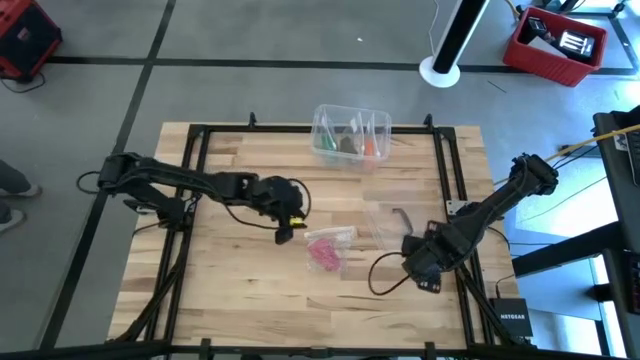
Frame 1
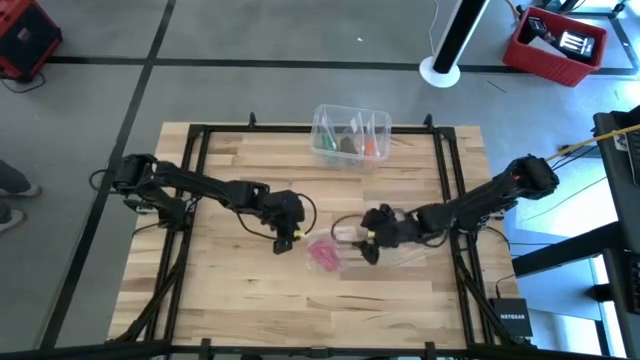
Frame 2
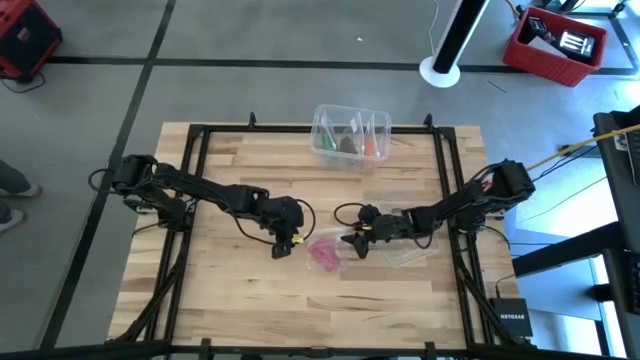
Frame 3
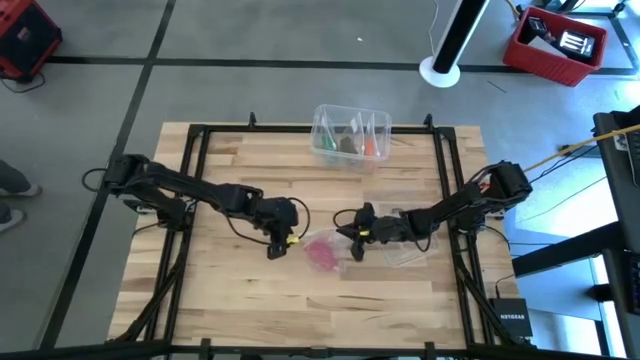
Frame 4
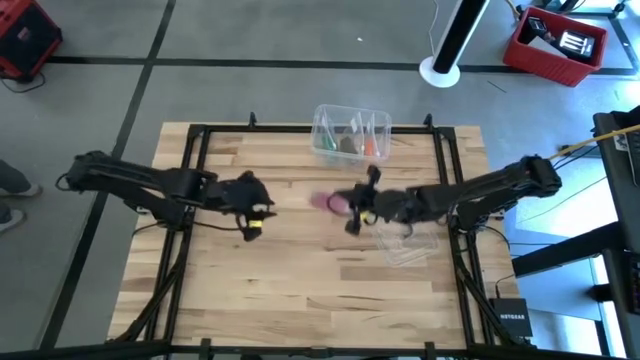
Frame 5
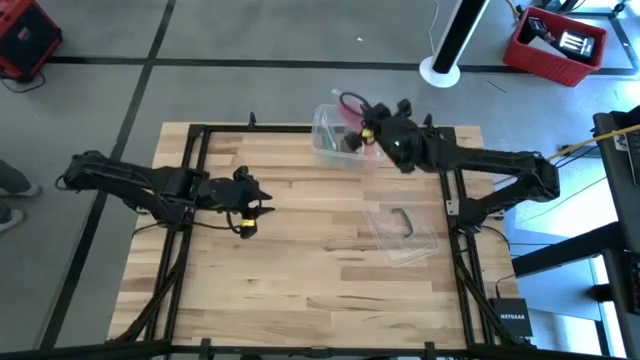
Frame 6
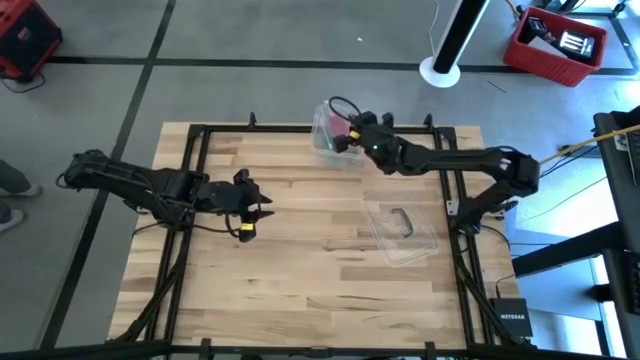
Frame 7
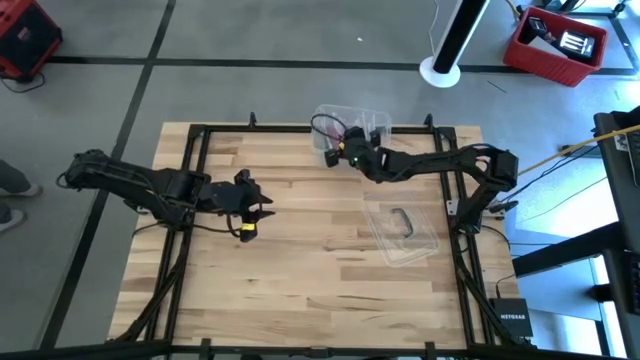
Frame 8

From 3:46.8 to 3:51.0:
Task: Roll bandage
Put the transparent zip bag into the transparent container

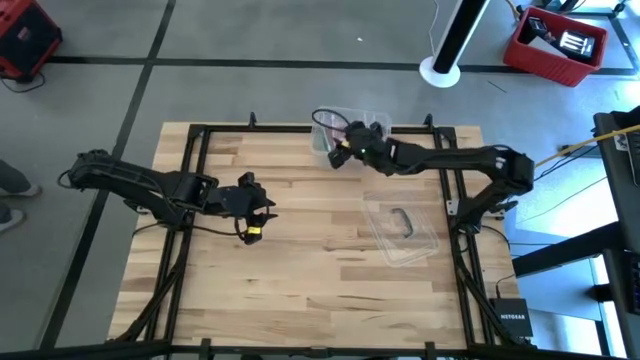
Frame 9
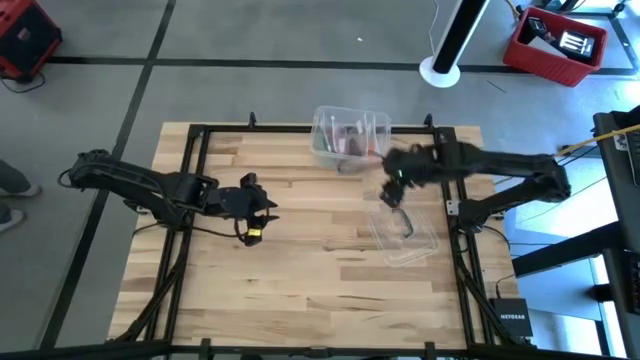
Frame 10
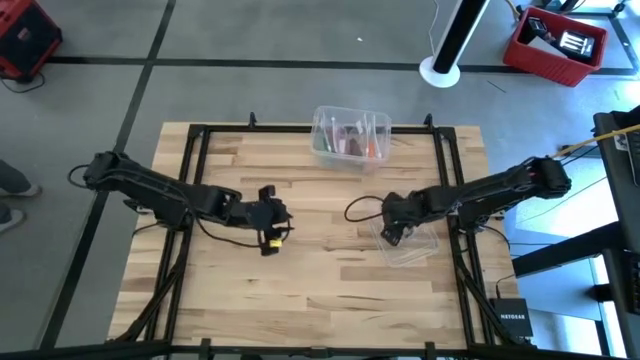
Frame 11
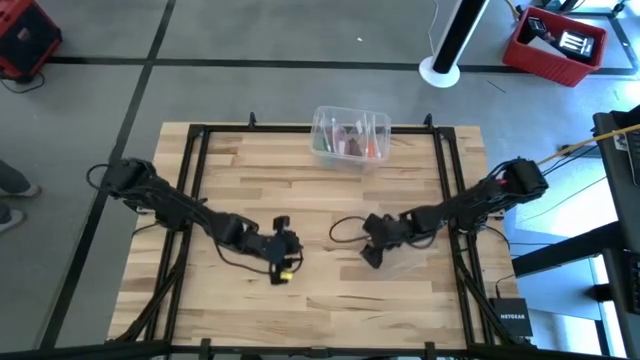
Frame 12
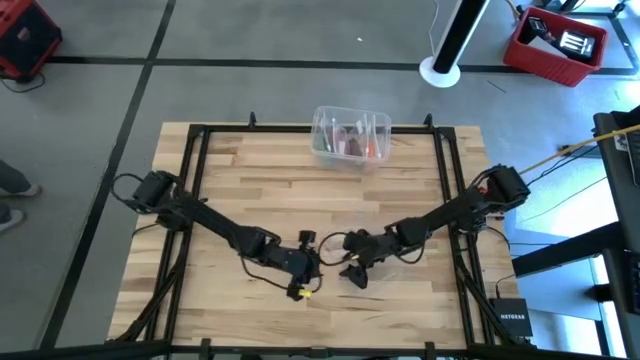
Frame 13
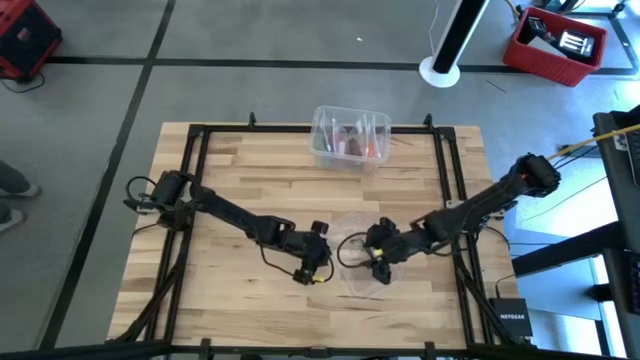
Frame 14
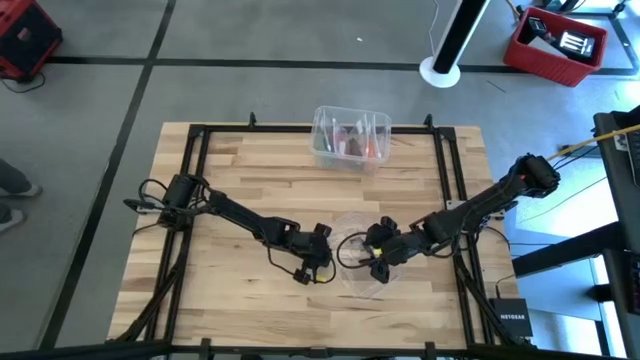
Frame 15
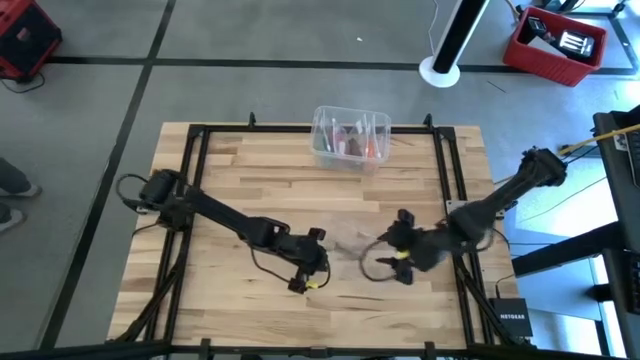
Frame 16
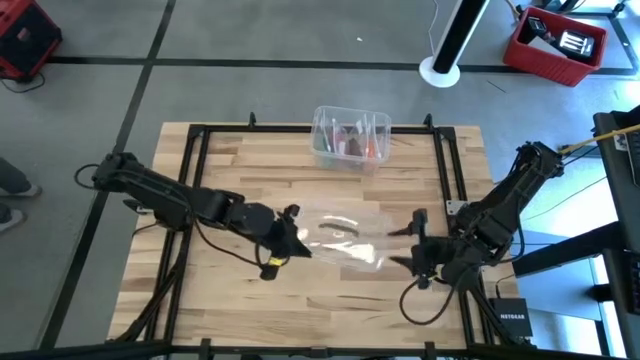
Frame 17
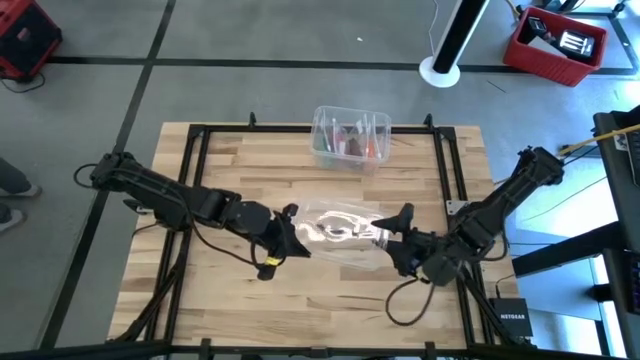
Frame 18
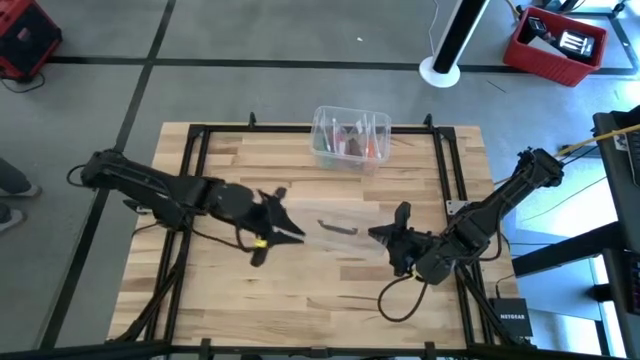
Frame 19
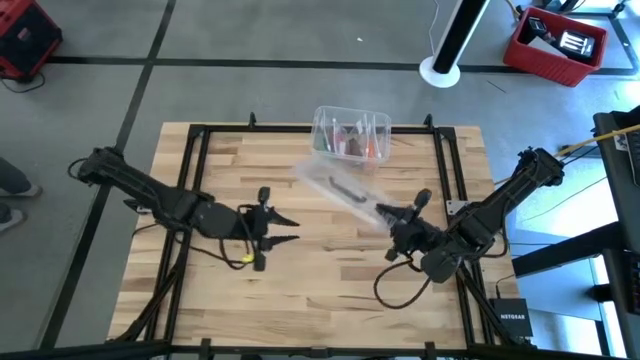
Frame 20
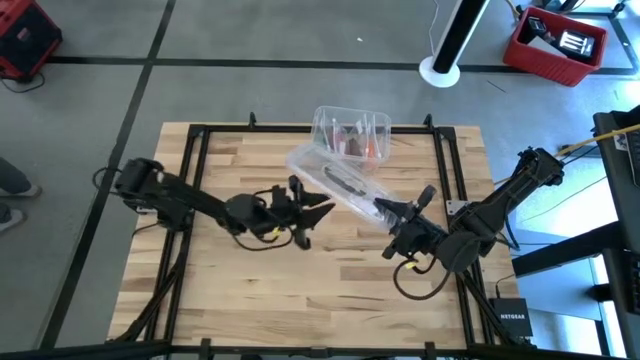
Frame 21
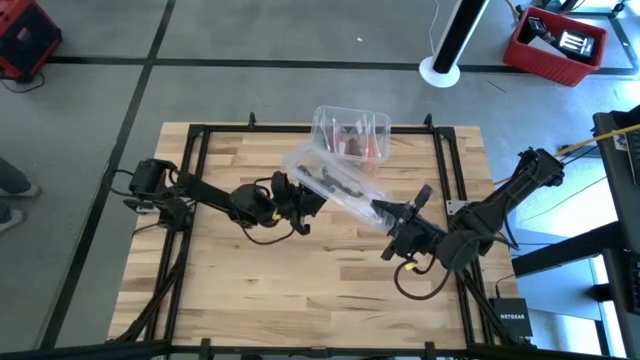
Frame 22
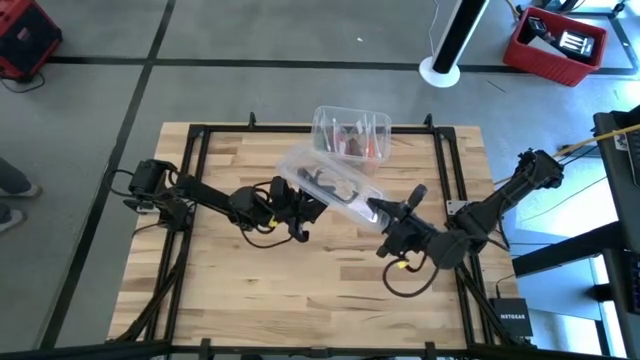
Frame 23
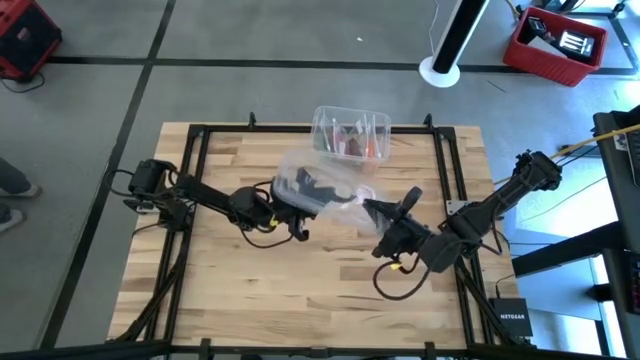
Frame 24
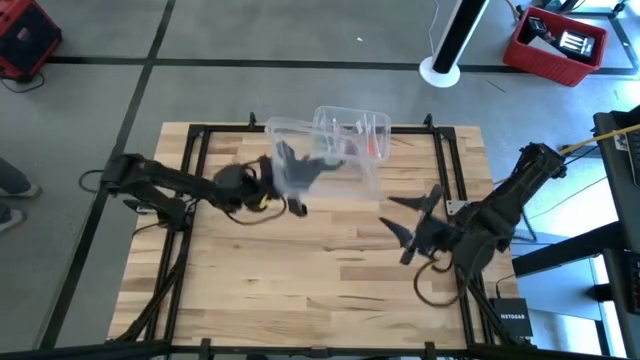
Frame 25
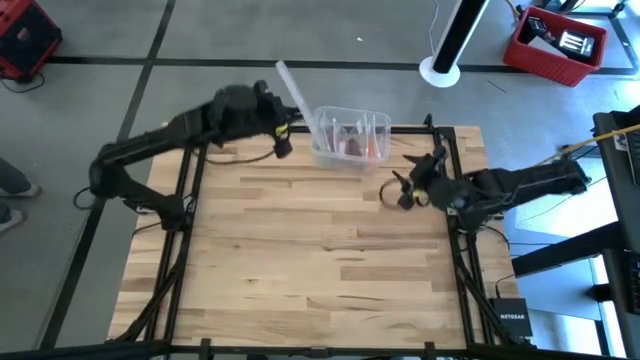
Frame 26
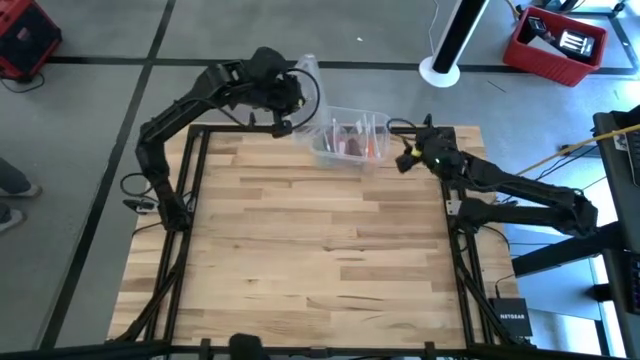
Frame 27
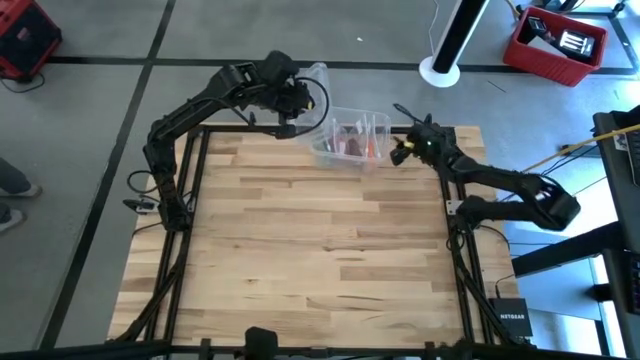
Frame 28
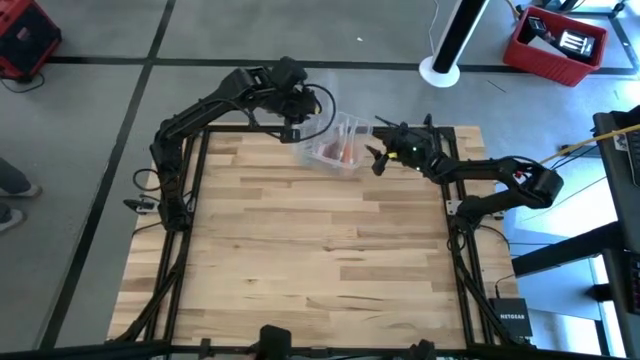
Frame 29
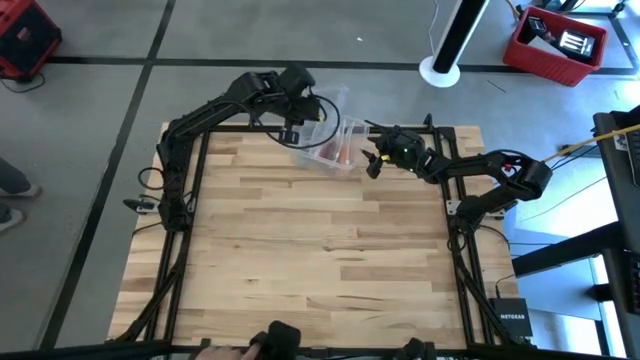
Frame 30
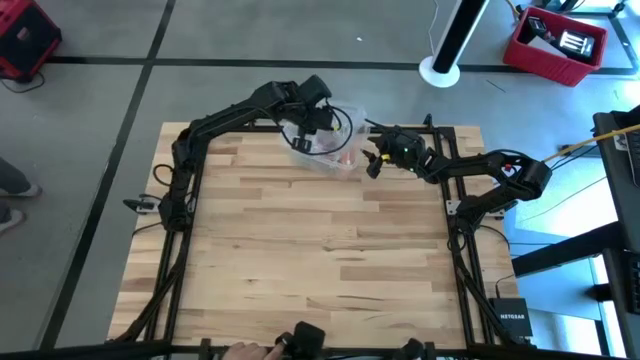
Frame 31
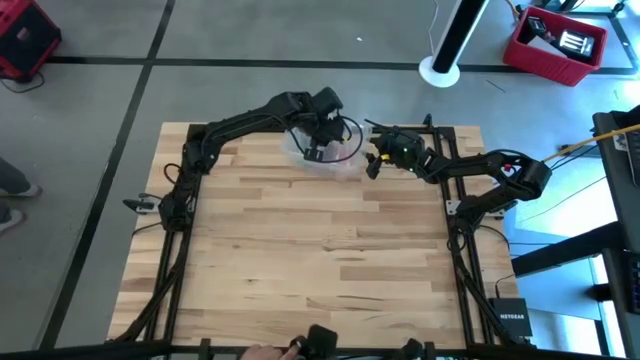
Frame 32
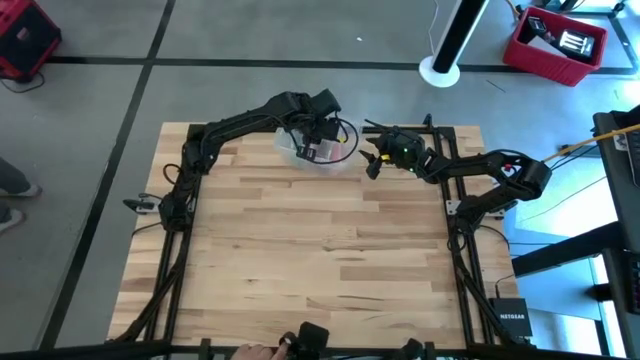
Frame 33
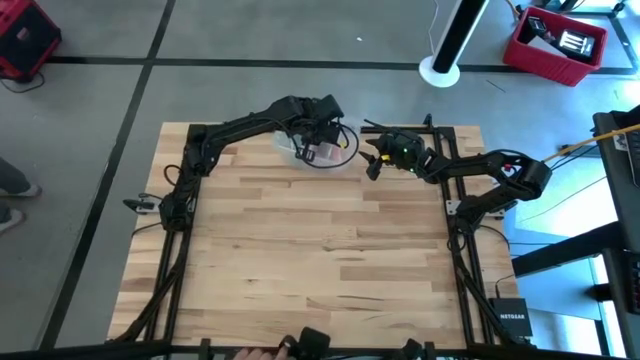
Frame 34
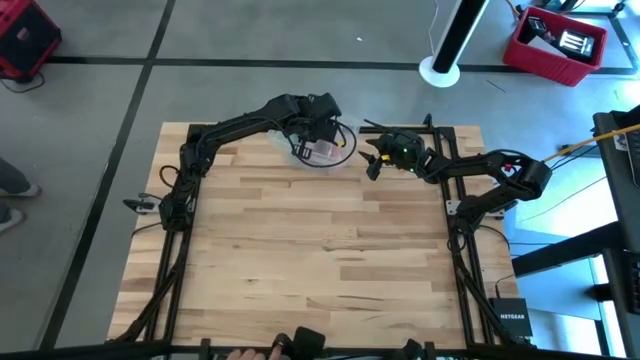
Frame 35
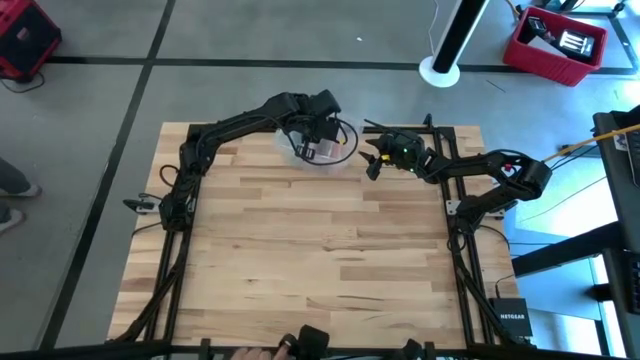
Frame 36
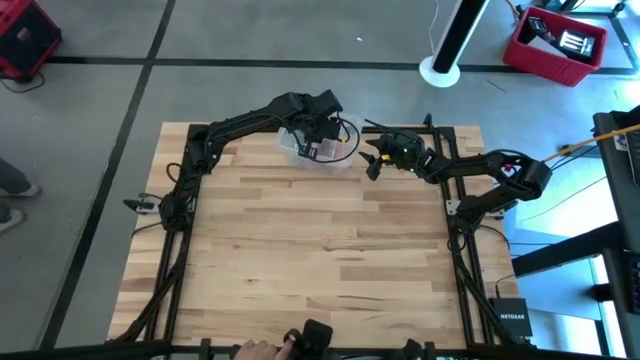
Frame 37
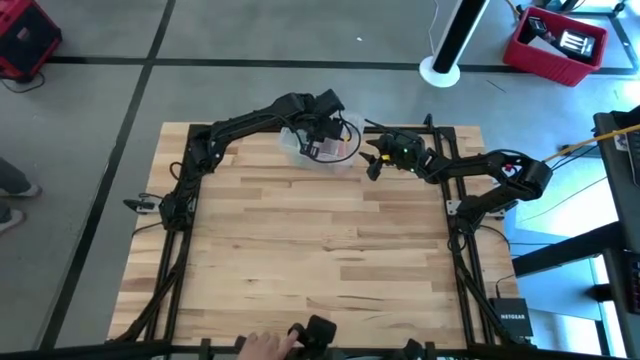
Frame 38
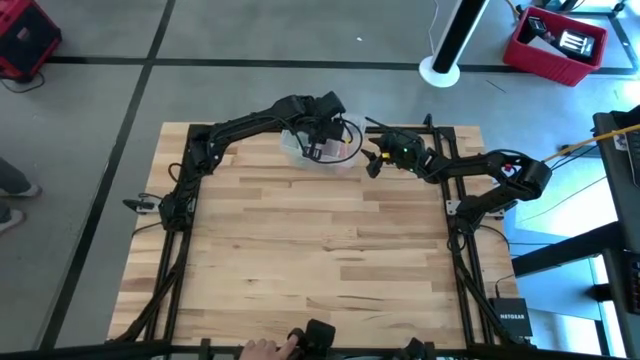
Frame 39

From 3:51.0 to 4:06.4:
Close the transparent container

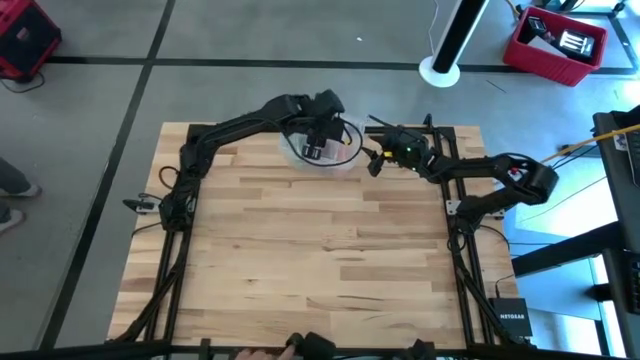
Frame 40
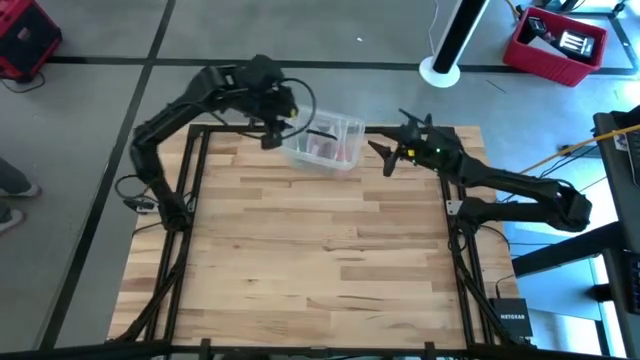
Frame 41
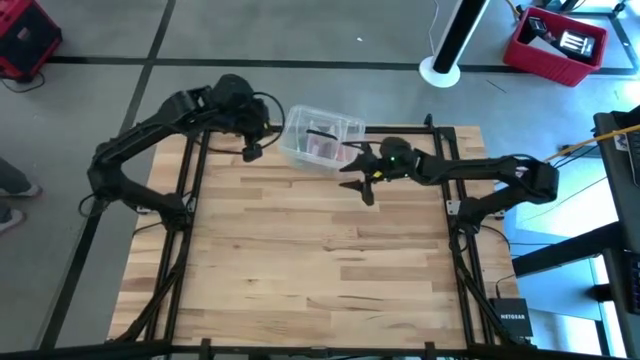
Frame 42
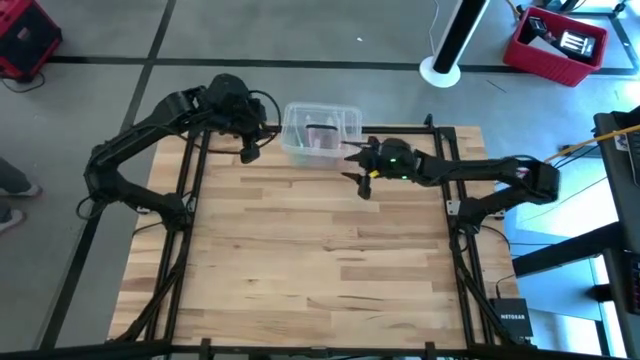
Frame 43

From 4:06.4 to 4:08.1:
Adjust the transparent container
